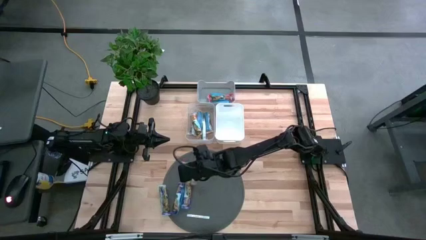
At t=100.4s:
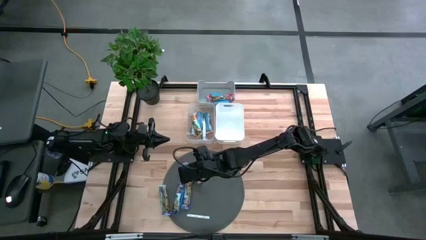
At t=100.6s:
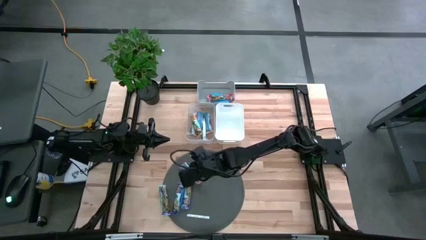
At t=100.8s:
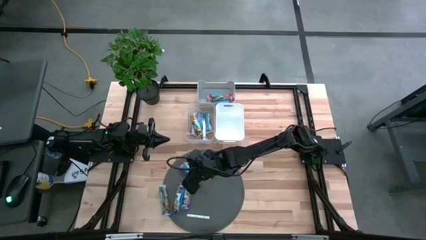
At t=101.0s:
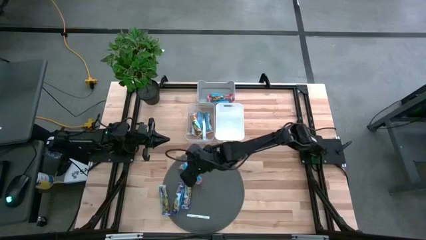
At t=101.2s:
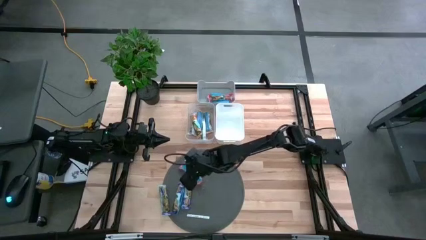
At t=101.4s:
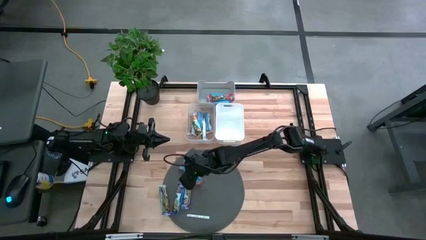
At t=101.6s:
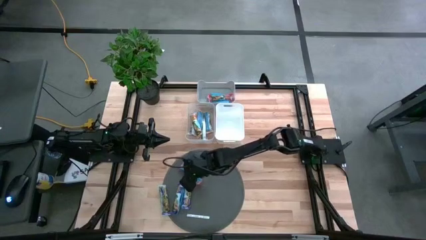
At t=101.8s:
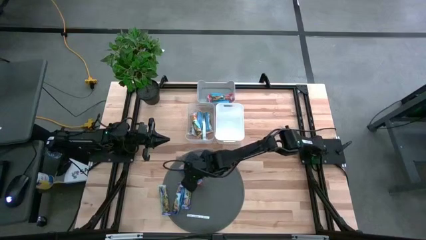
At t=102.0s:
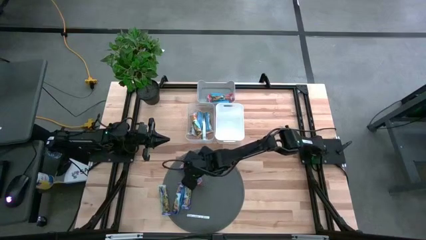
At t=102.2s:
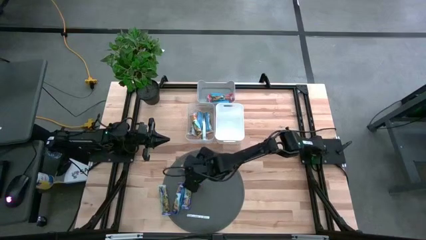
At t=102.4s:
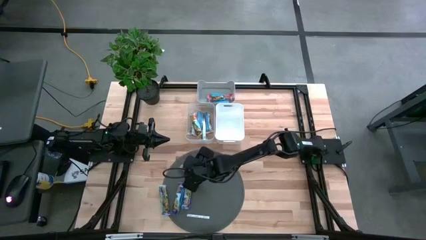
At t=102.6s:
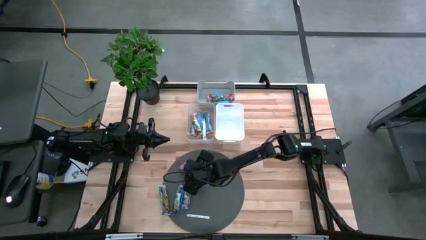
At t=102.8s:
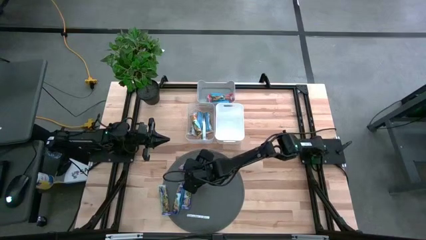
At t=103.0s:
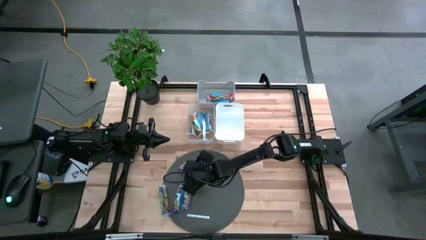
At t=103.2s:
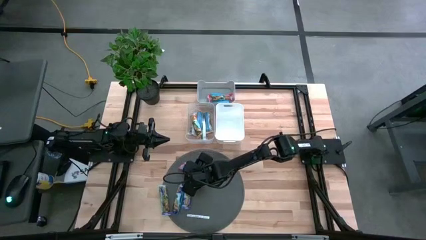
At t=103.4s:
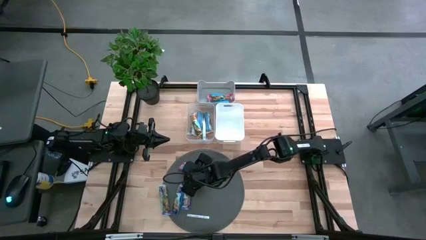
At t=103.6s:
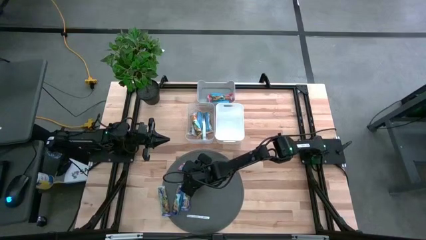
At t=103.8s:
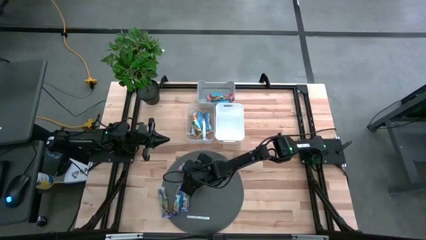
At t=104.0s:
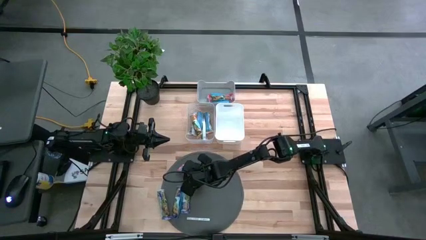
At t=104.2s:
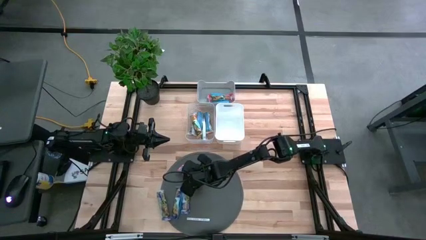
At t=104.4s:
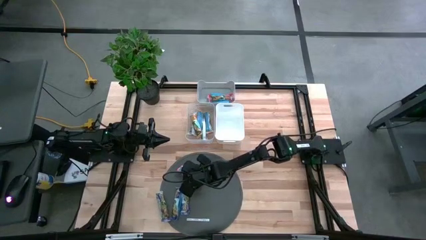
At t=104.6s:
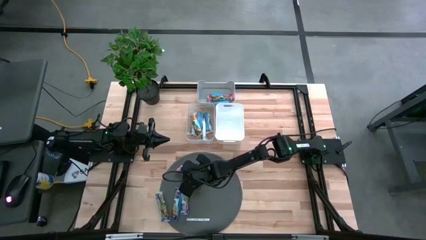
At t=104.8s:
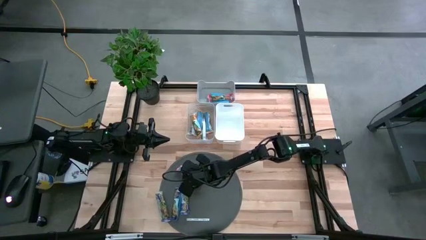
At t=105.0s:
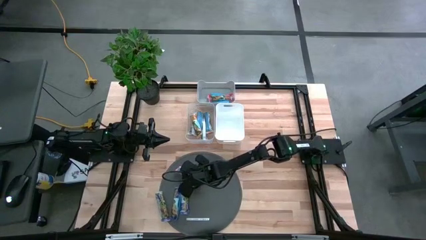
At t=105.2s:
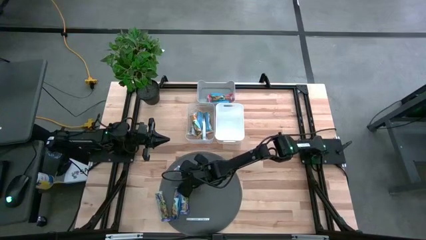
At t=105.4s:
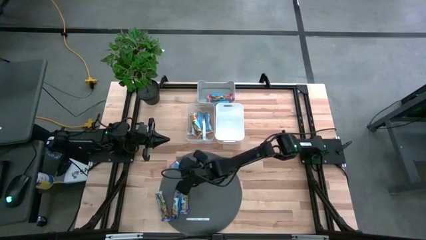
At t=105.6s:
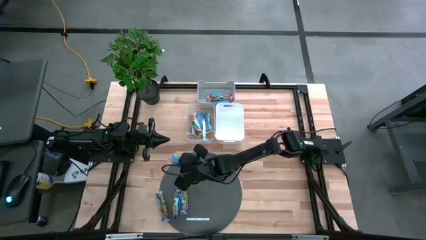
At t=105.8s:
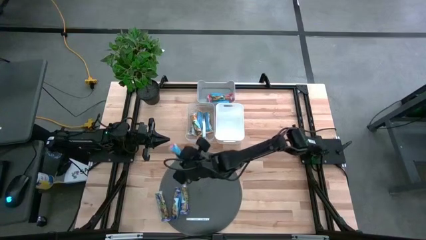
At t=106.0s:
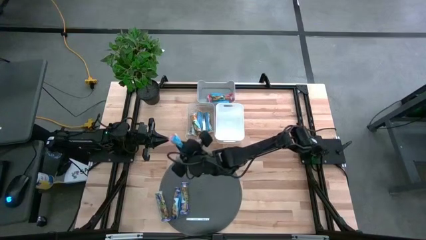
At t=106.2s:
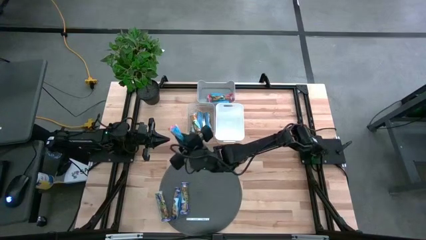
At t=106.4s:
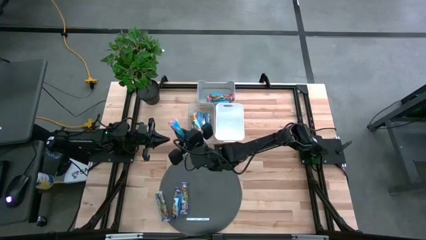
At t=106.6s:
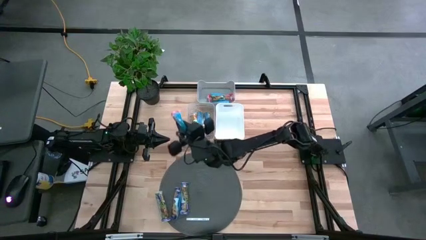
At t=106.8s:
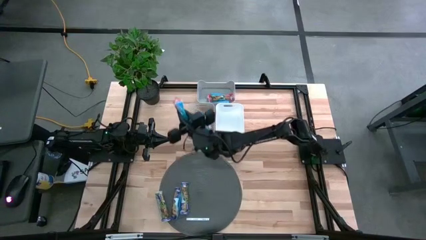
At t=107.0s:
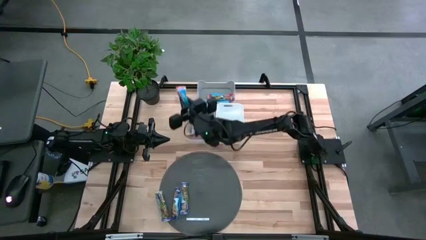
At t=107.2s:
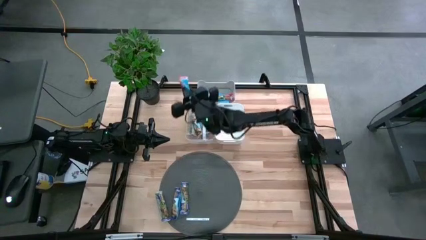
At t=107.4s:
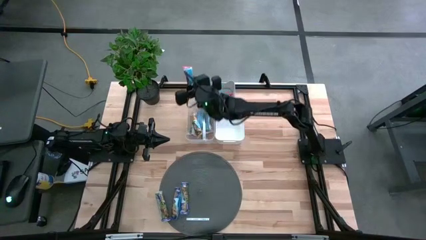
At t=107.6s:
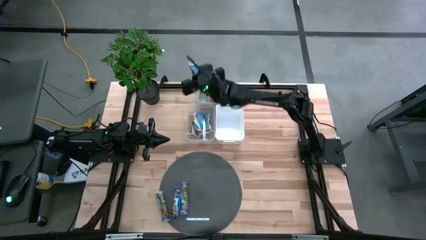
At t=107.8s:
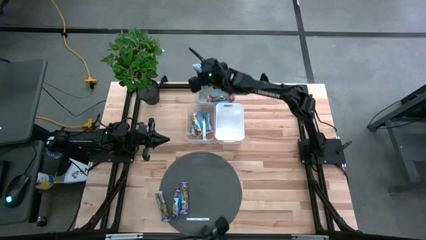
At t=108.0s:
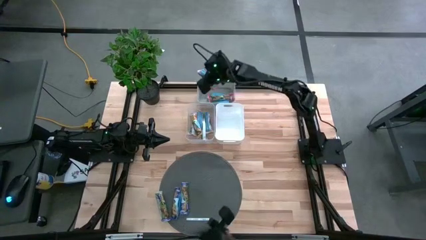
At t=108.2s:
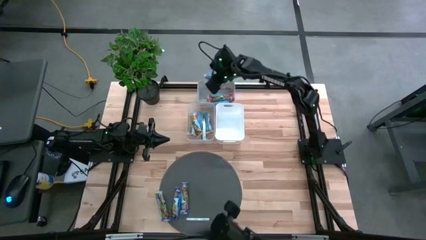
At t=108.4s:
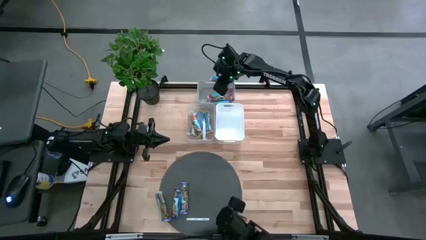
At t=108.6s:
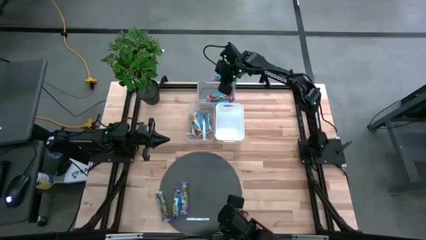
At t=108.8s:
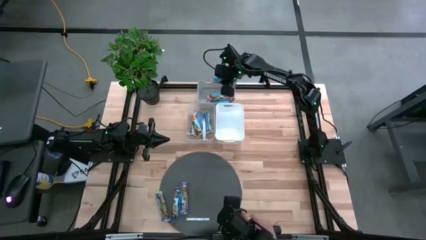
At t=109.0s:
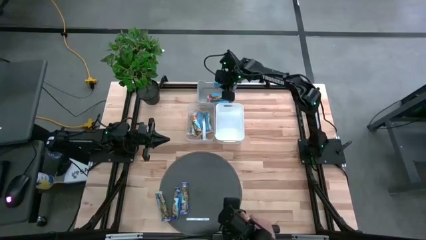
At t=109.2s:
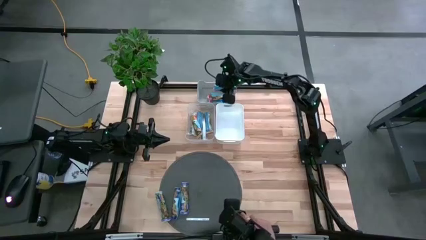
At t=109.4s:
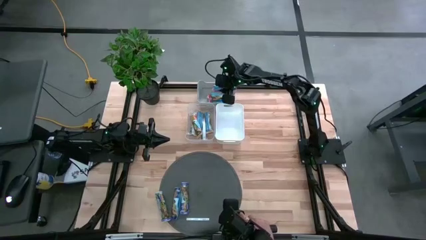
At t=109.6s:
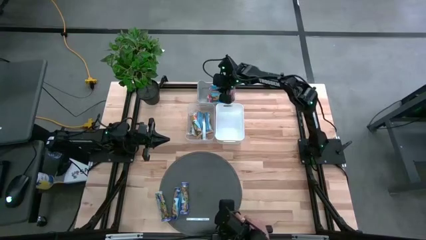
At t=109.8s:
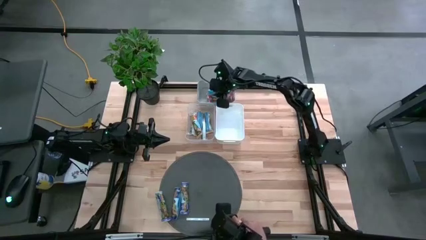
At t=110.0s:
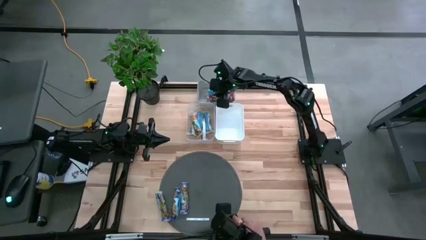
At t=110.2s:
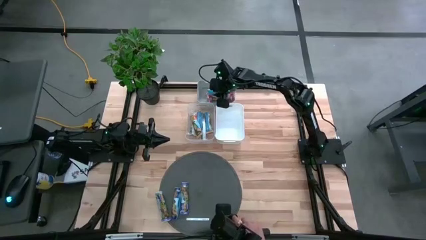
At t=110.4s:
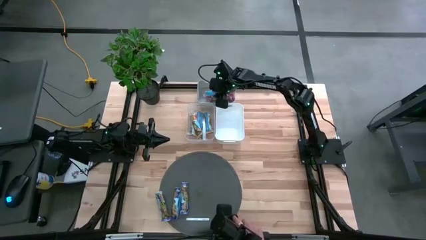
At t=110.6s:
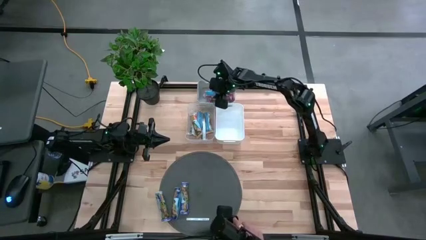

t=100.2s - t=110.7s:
Task: Pick and place Granola Bars by type
Put the red granola bar into the gray bin
